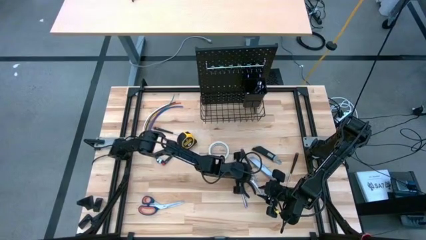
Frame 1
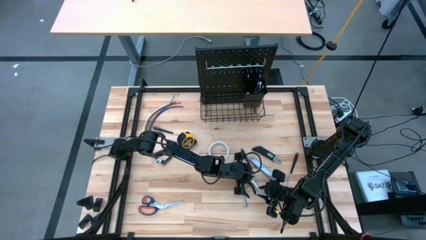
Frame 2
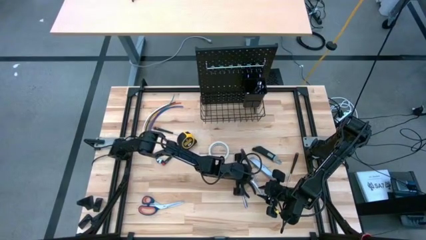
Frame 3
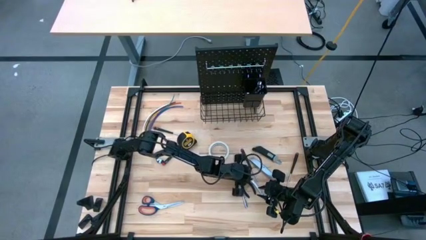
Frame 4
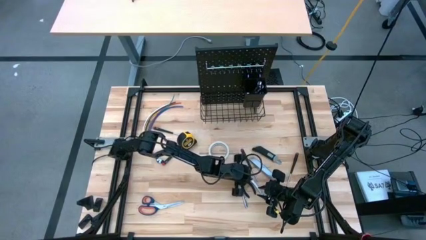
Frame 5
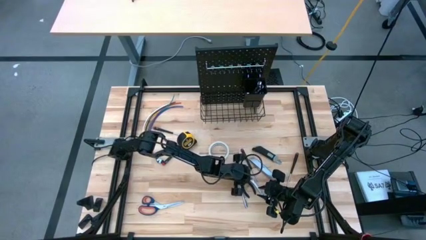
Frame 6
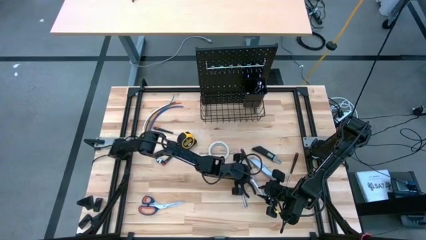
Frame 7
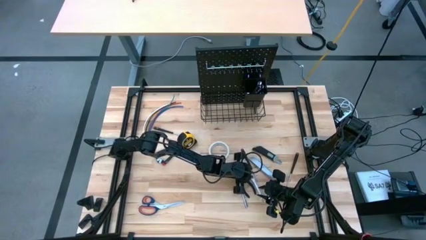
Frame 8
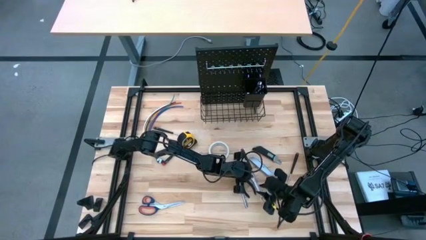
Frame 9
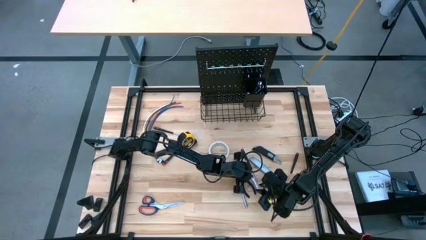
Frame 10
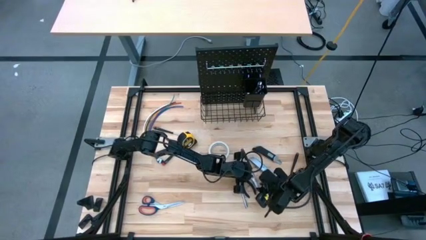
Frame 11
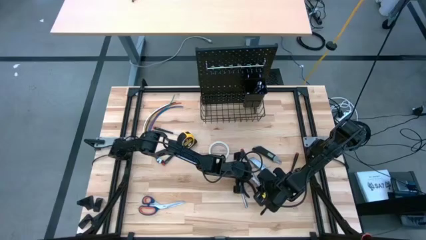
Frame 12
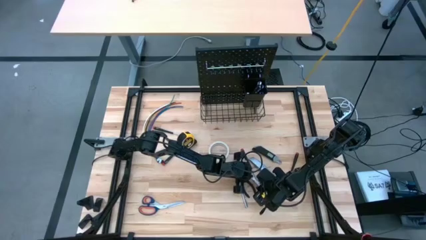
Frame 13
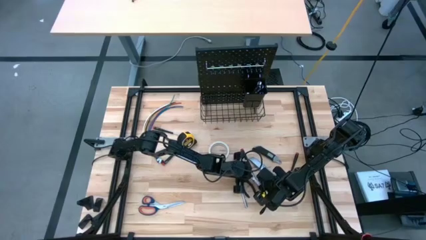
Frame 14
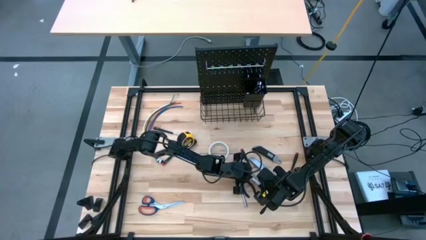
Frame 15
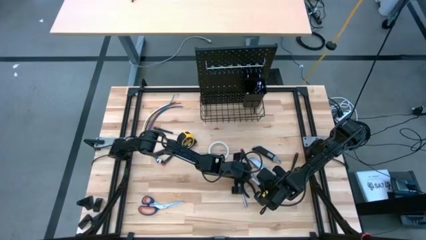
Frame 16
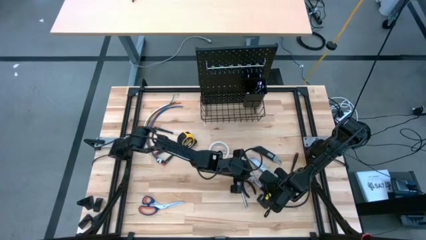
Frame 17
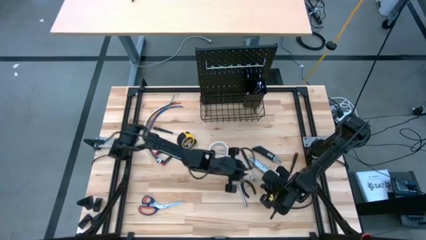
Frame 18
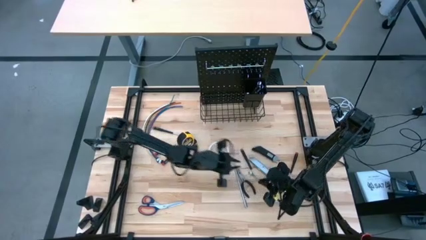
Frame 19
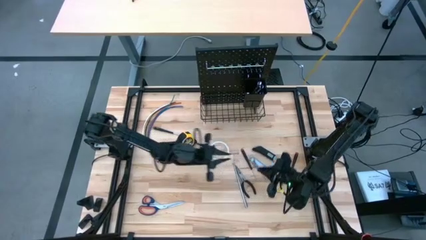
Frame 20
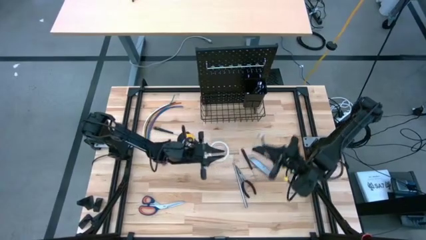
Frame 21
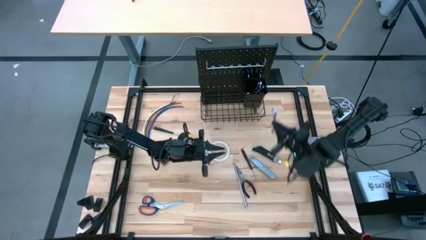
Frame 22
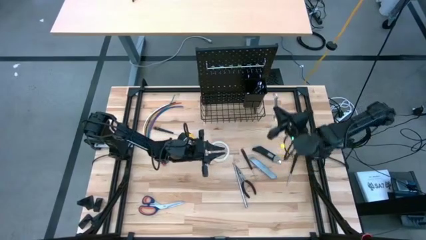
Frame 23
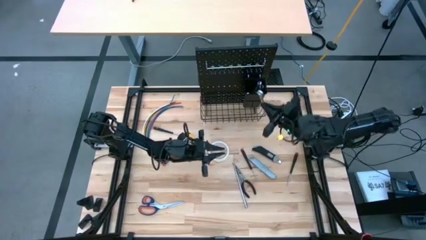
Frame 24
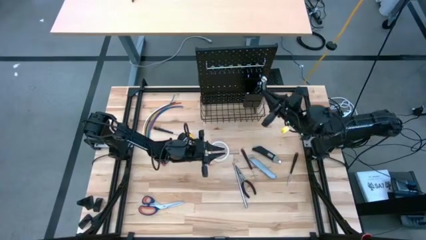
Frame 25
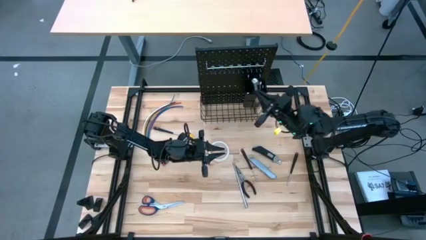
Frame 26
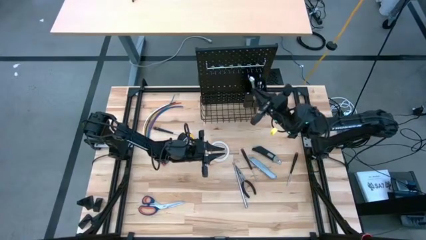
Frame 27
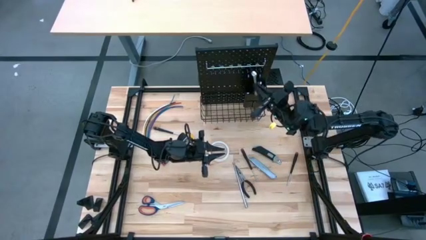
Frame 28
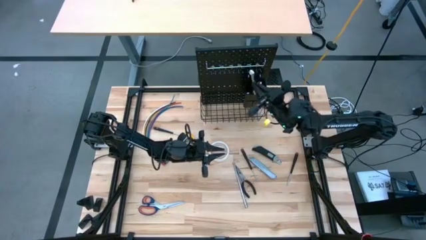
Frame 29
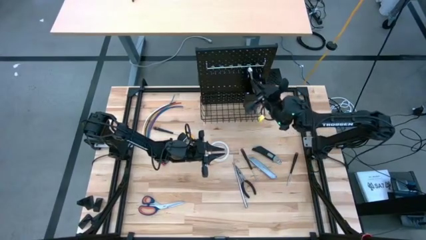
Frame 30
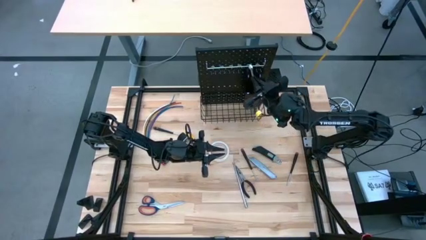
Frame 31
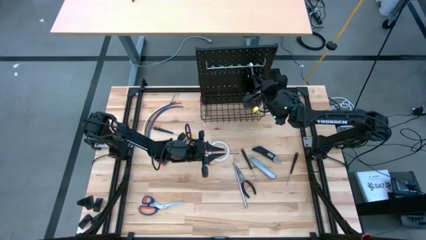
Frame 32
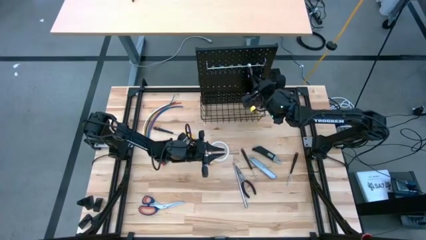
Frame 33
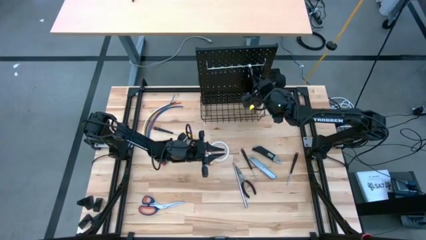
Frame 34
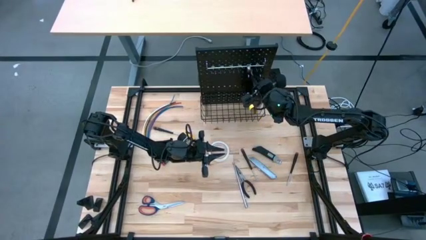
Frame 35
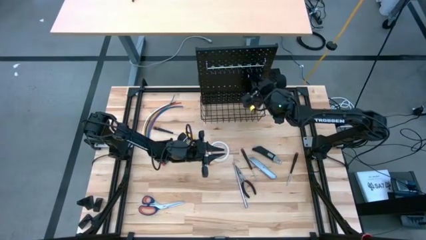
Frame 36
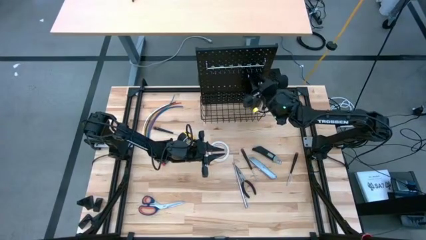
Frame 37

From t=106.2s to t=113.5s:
Task: Hang tools onto peg board
Put the wrench into the black bin on the peg board
